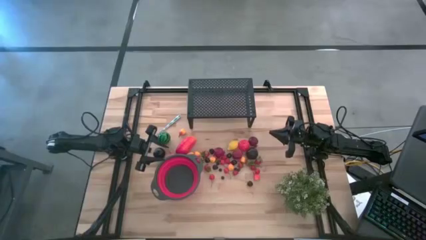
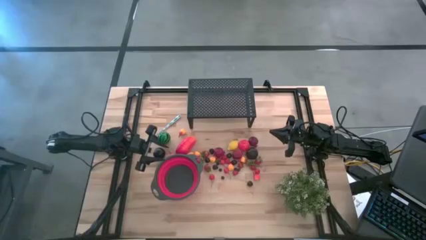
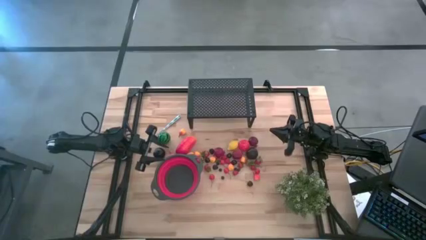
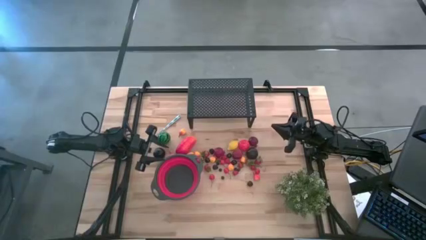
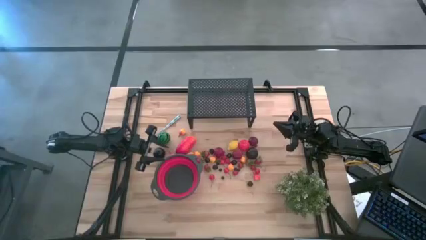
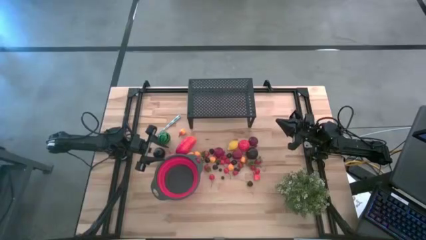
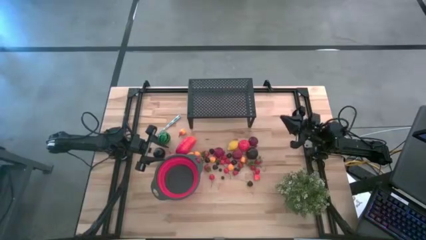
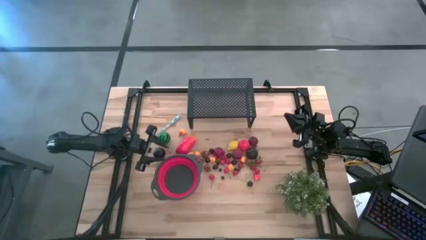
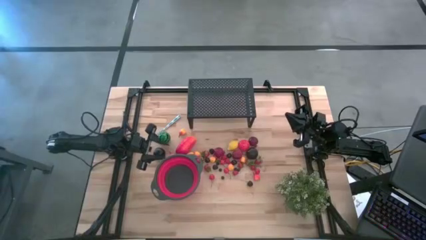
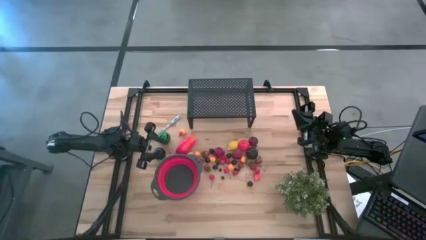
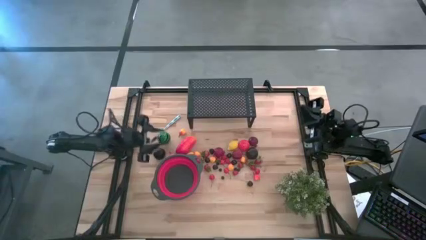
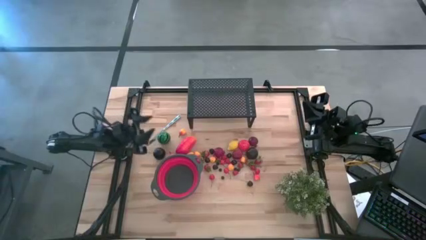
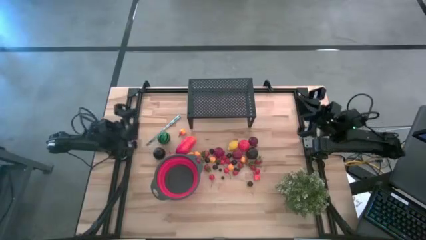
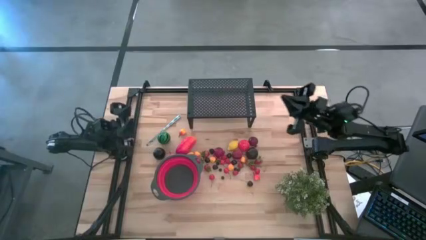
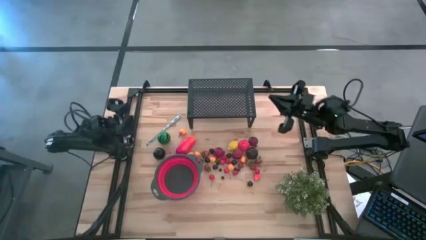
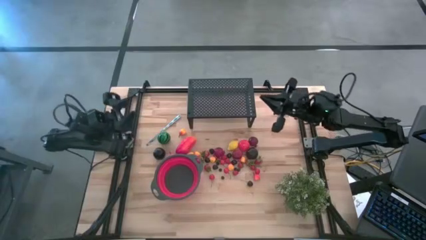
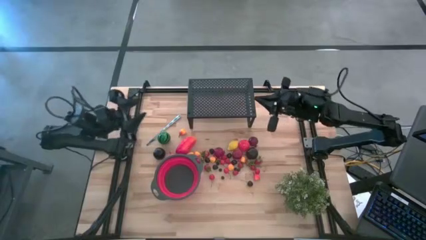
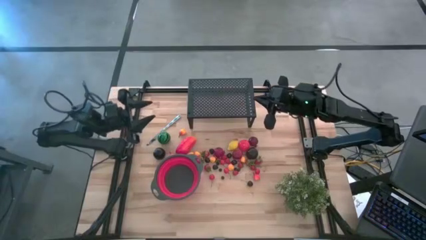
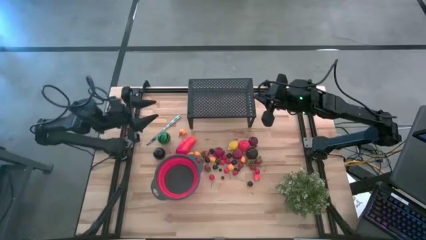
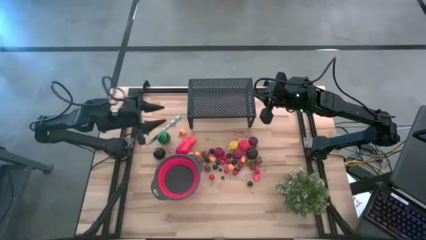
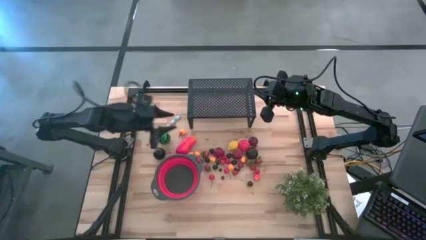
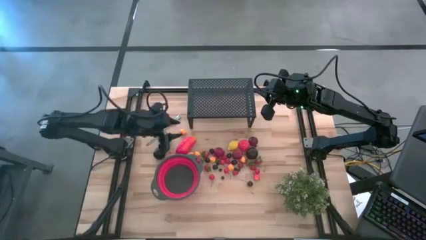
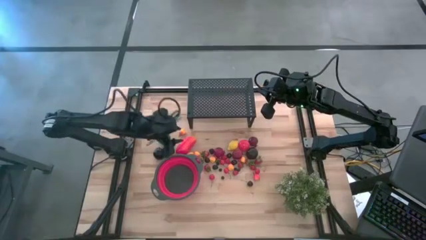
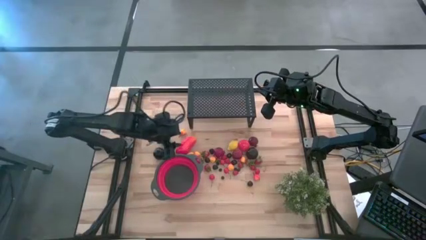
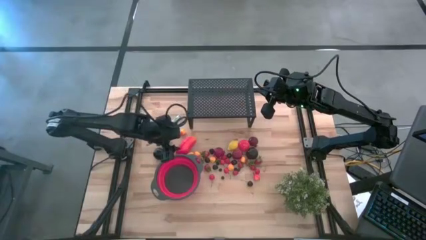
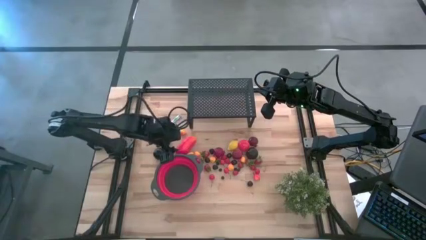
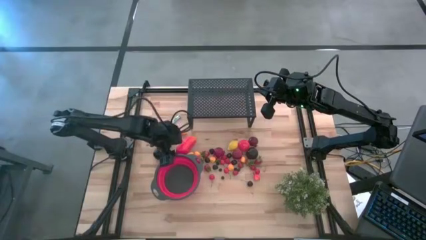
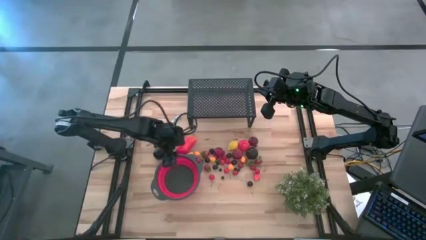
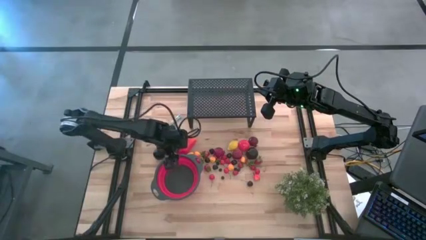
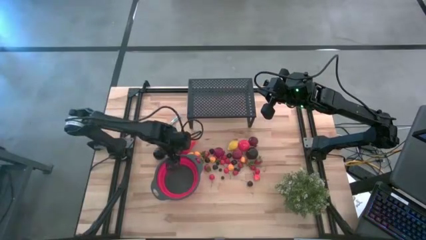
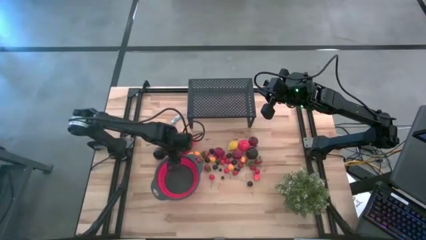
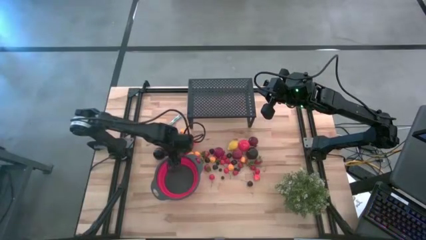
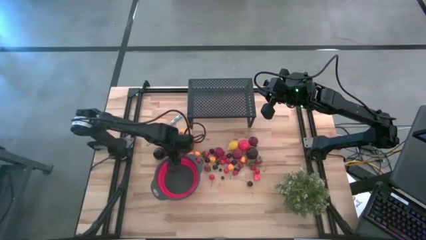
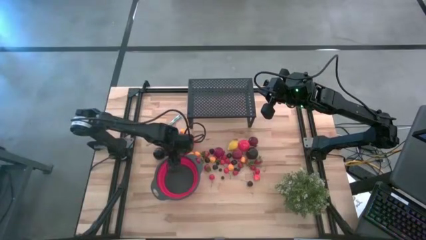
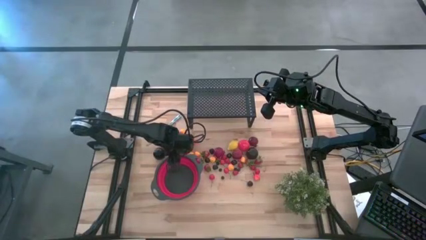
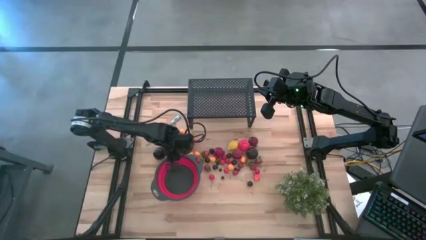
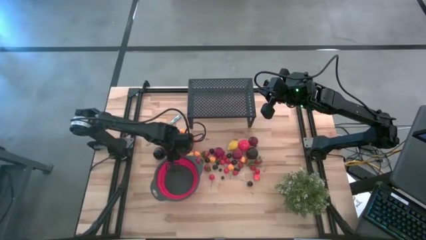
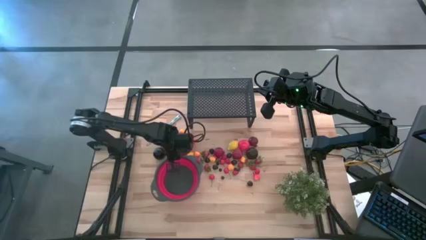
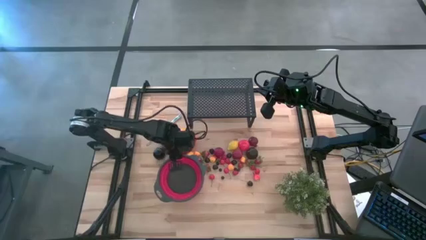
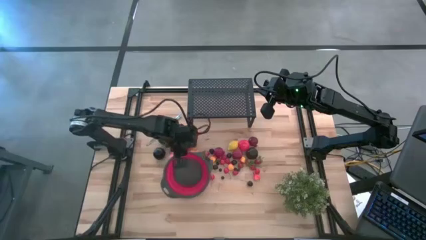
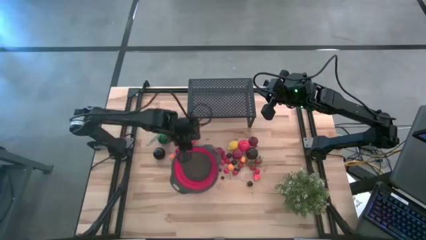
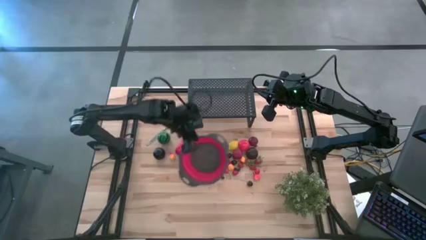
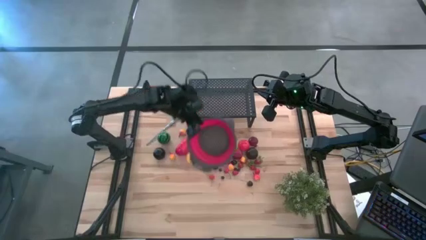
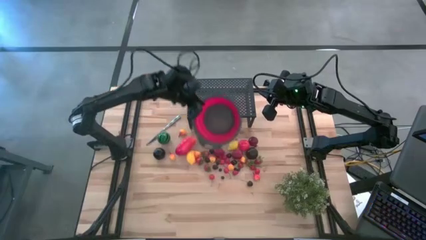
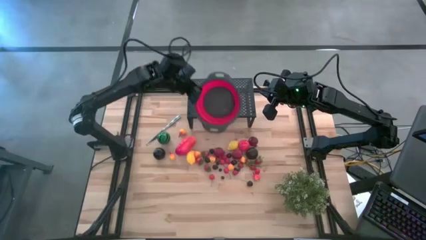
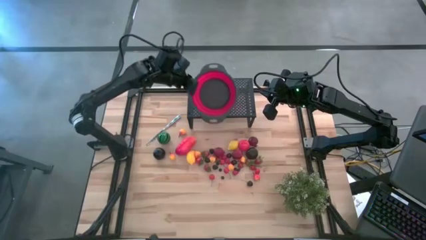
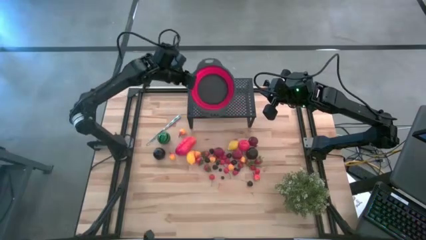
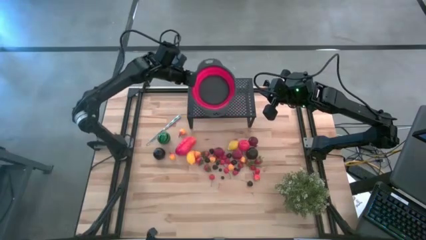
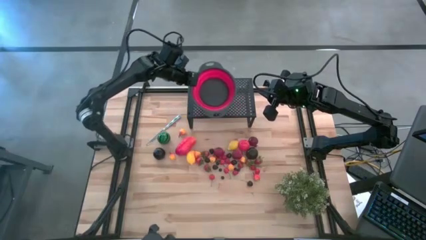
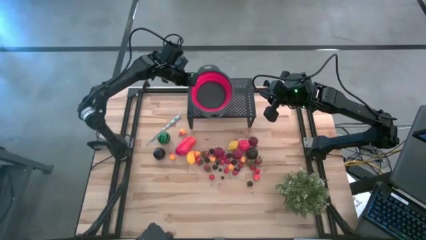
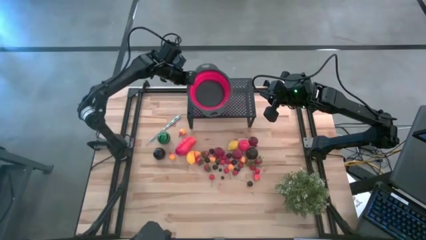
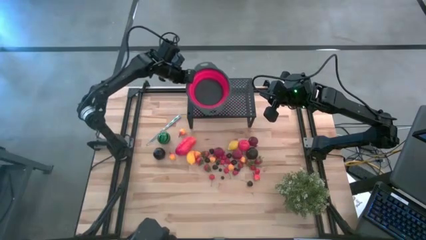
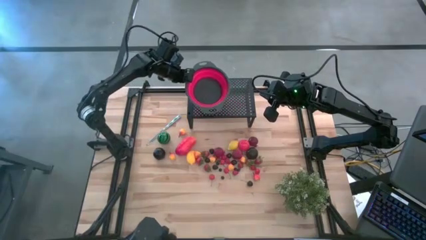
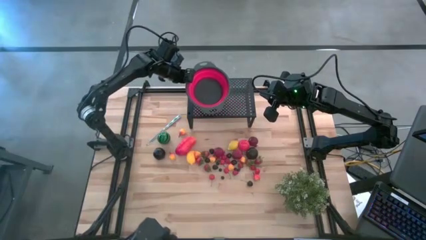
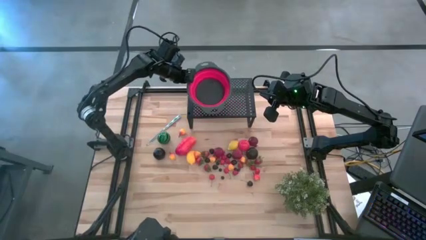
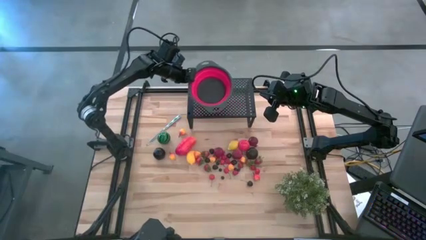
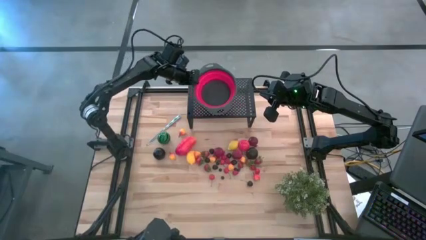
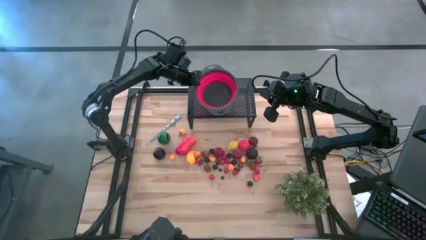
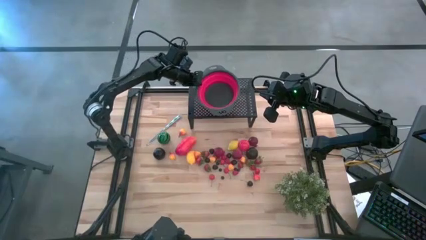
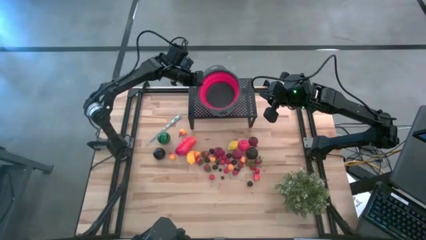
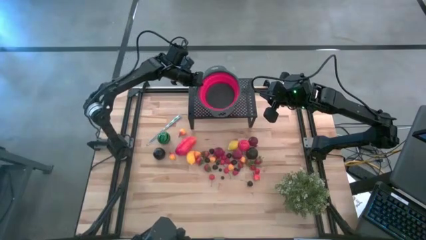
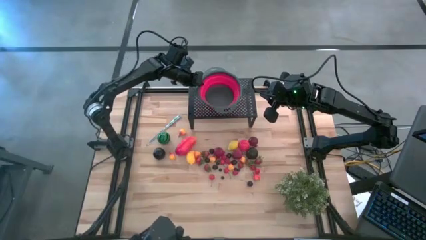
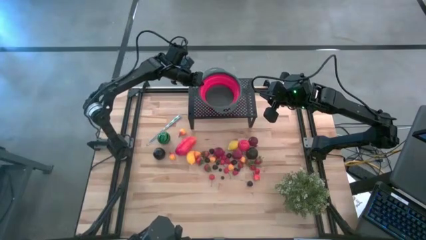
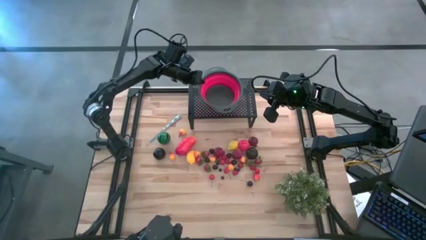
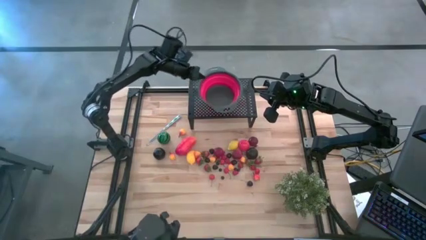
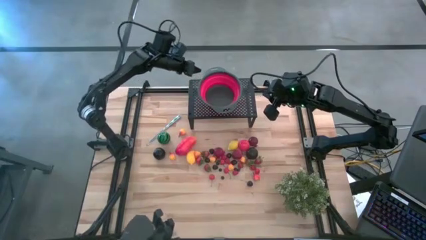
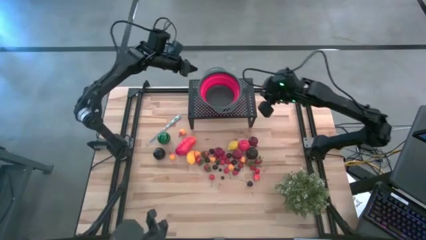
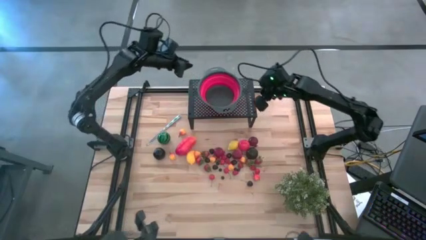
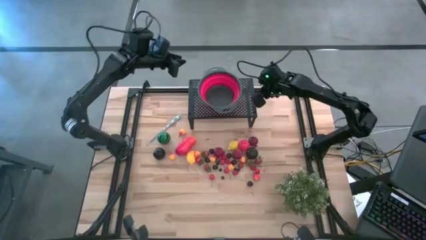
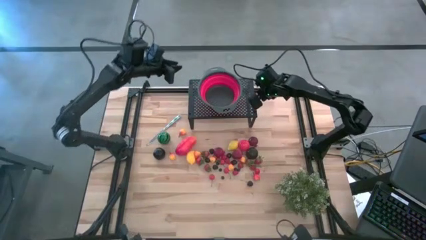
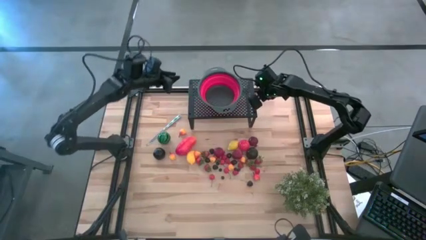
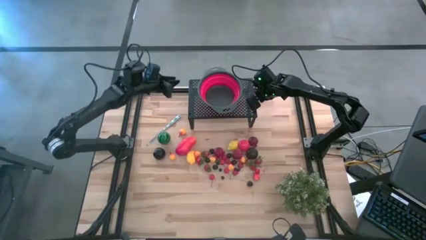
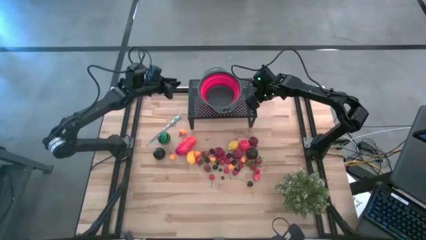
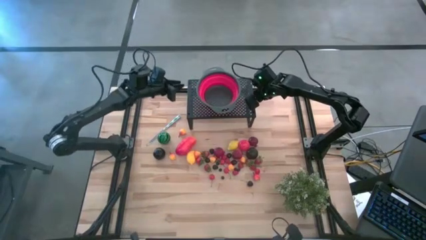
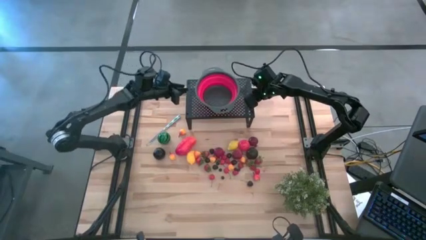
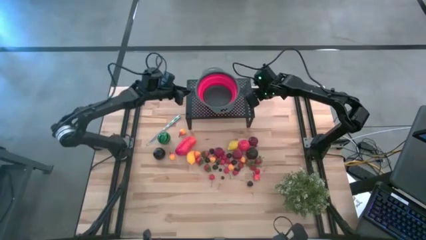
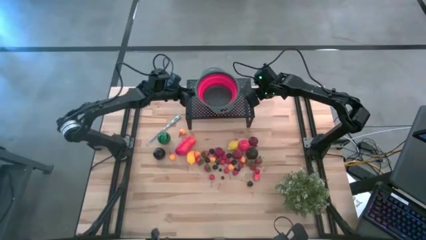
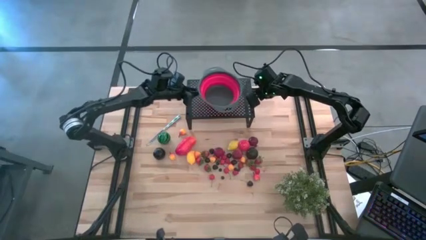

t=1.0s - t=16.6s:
Task: Pick & Place Fruit
Put the red colander on the shelf
